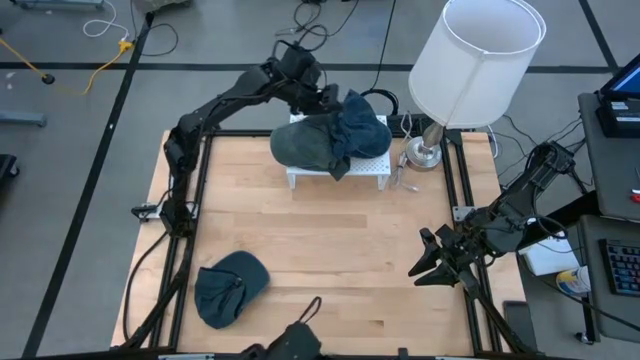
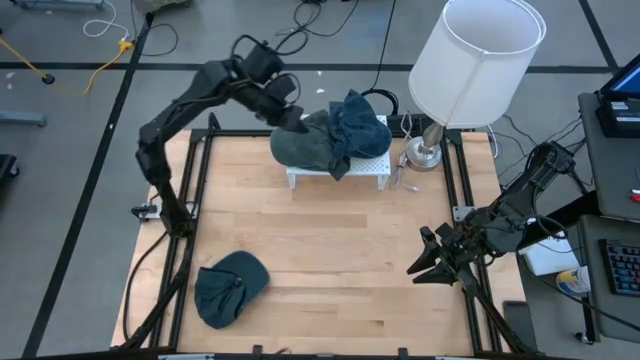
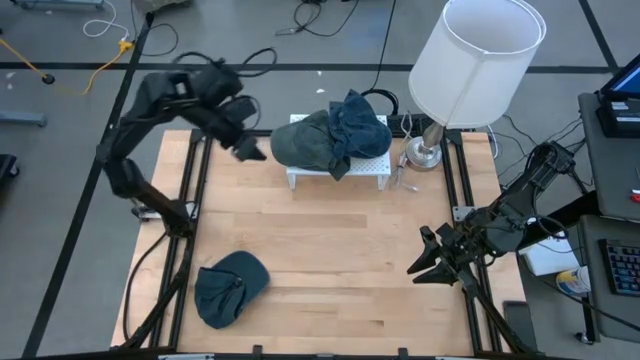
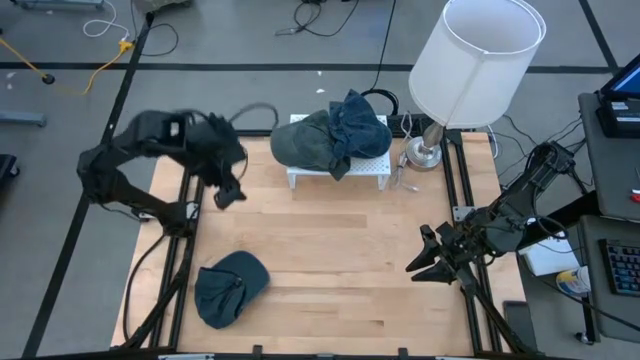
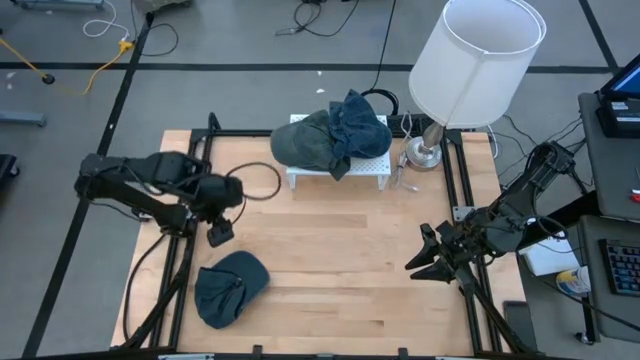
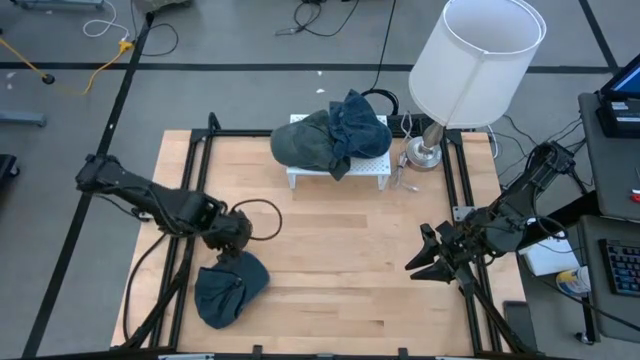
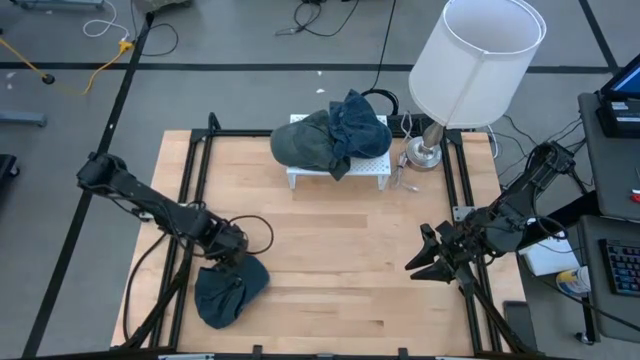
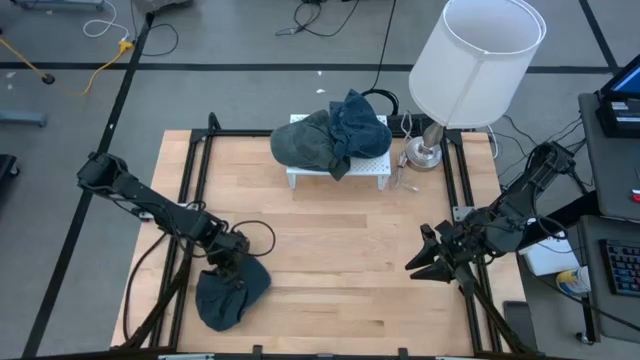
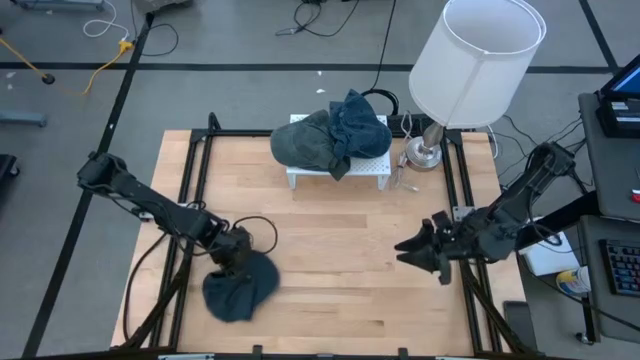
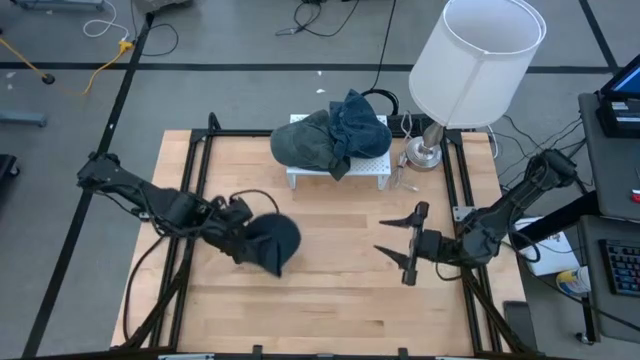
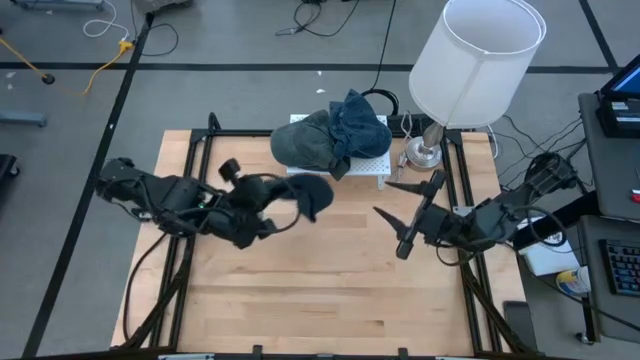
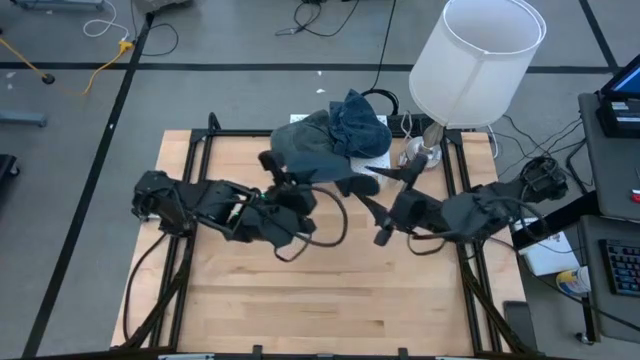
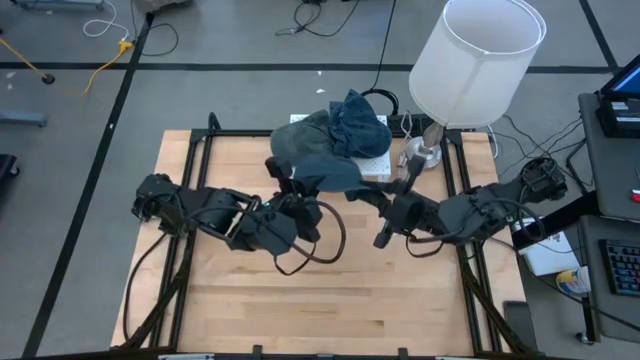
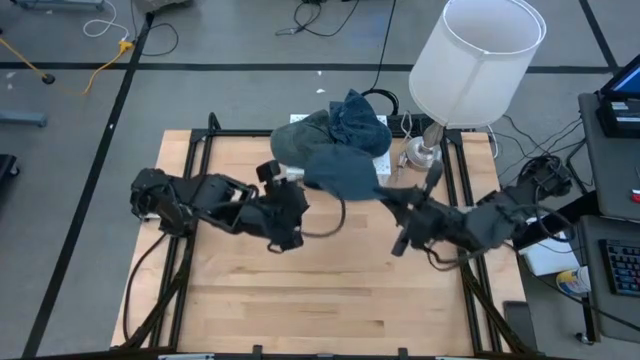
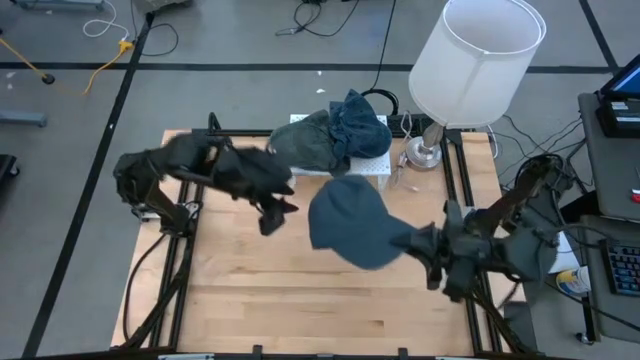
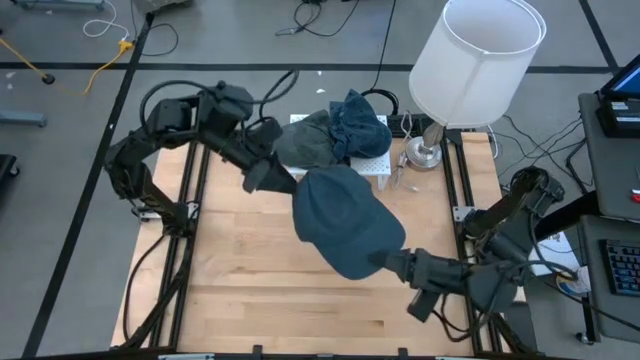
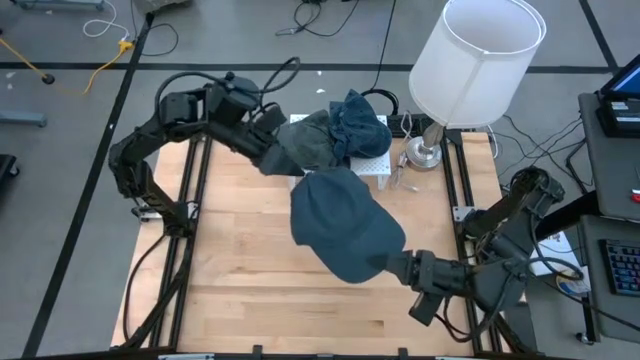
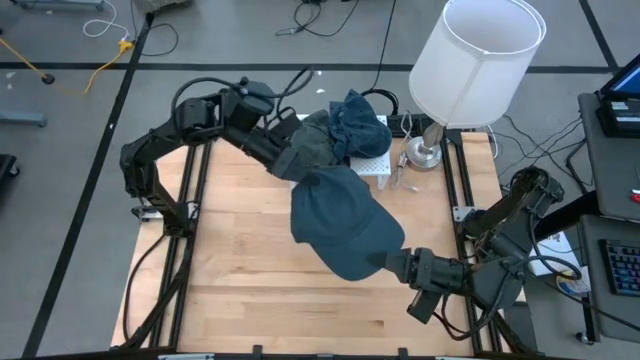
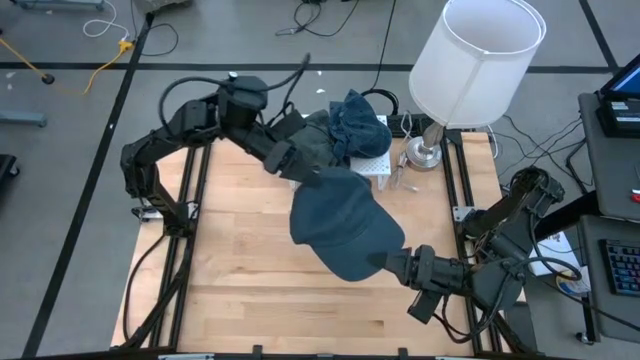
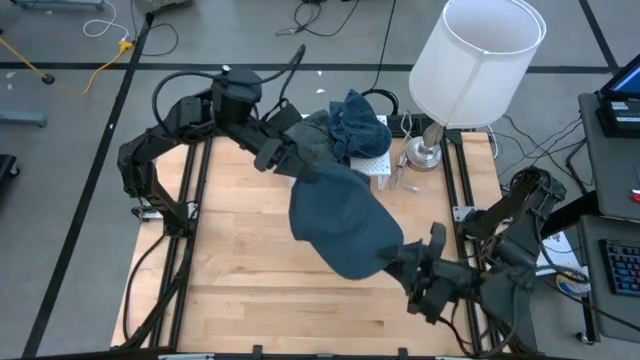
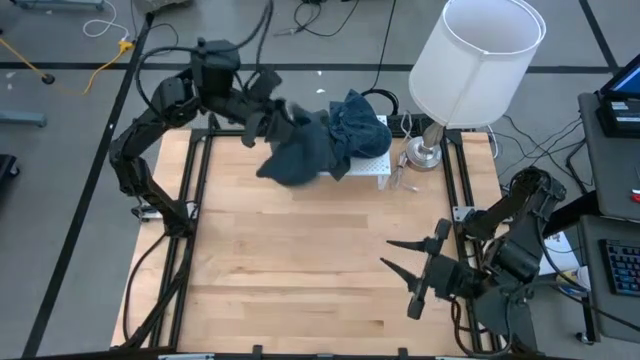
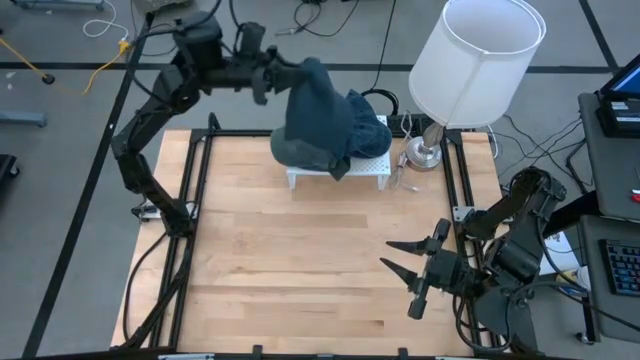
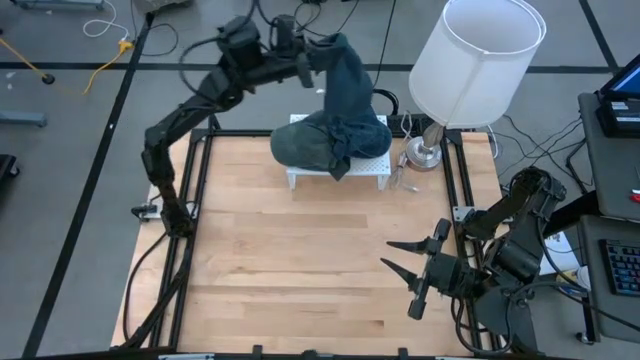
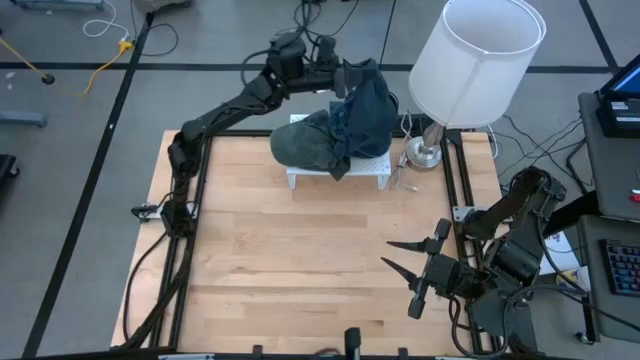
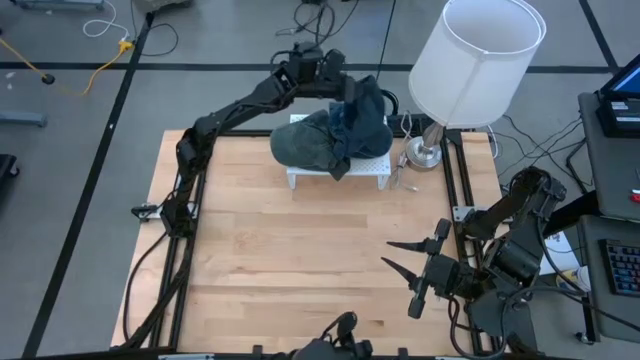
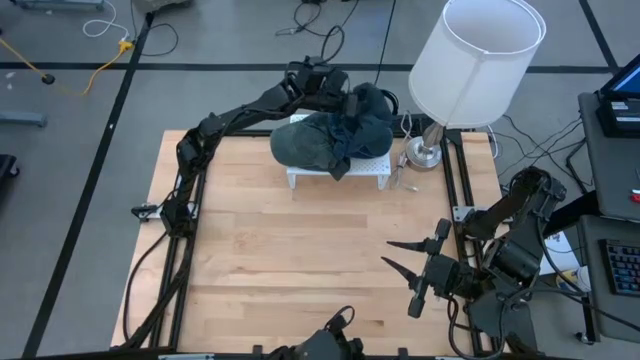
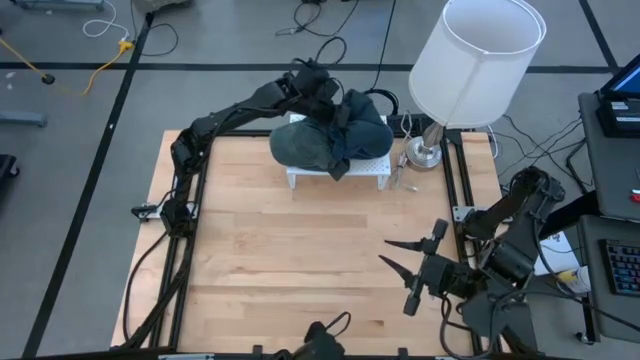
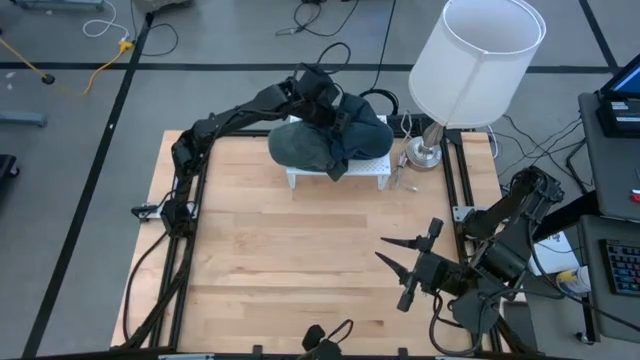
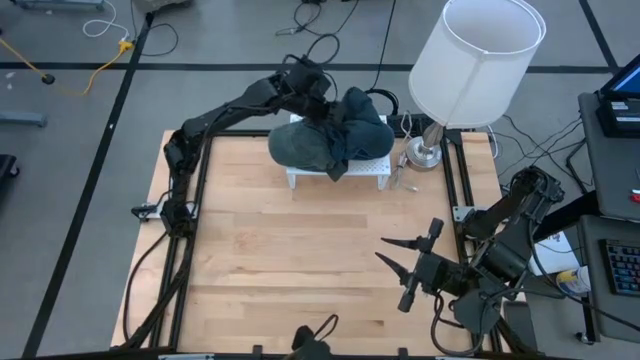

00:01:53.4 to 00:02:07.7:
Task: Pick & Place hat
Stack the blue cap on top of the gray blue on the shelf

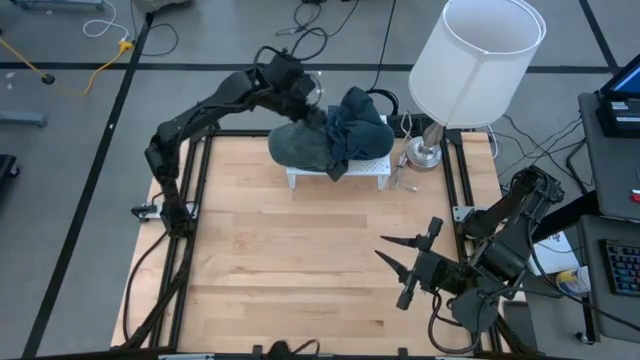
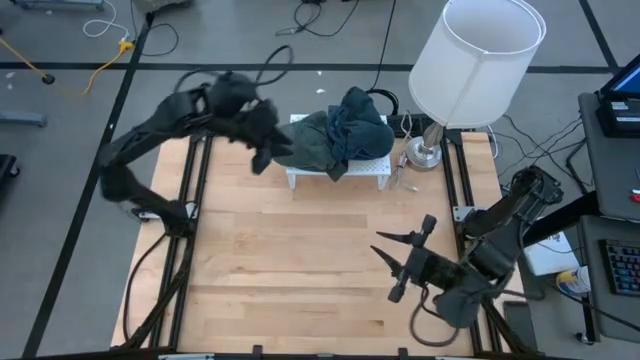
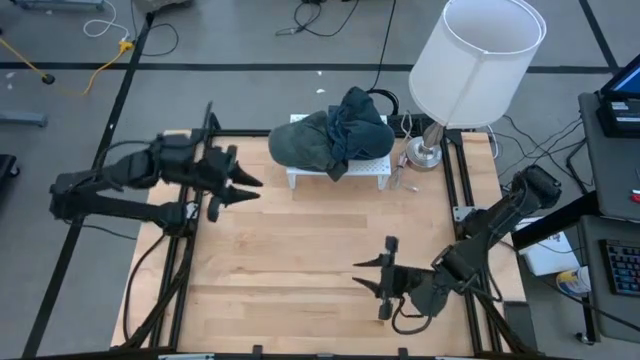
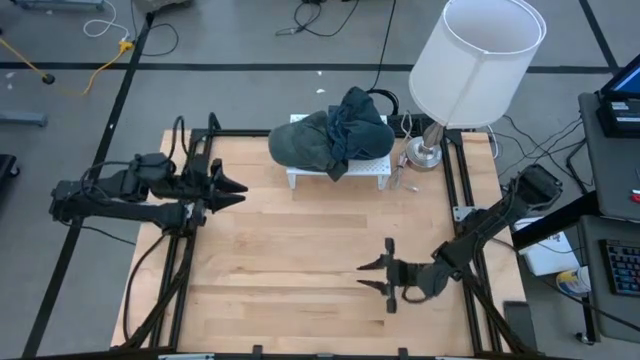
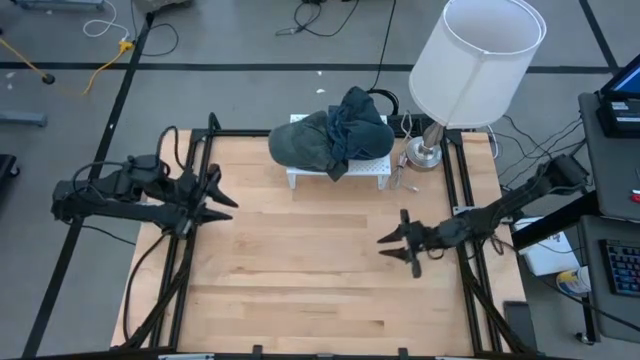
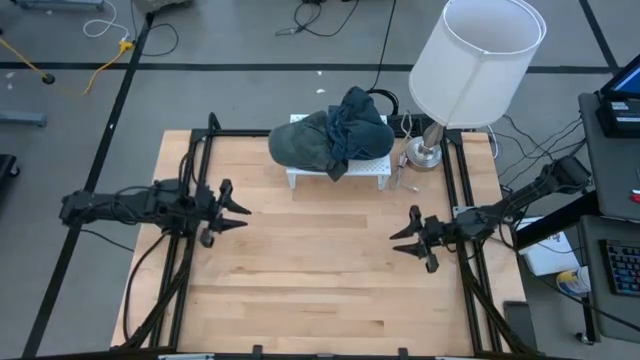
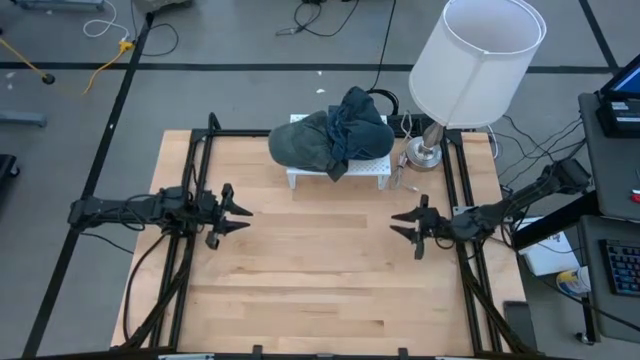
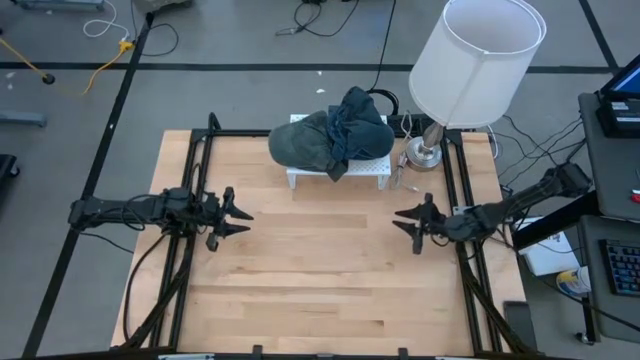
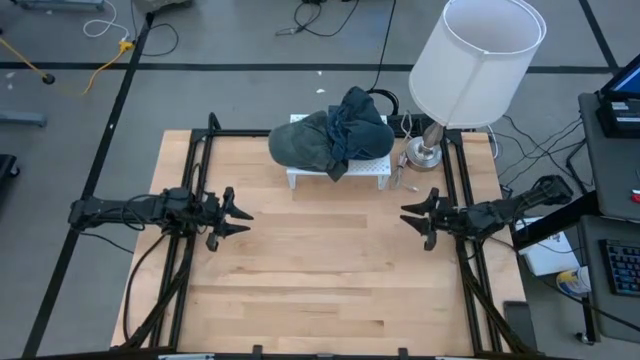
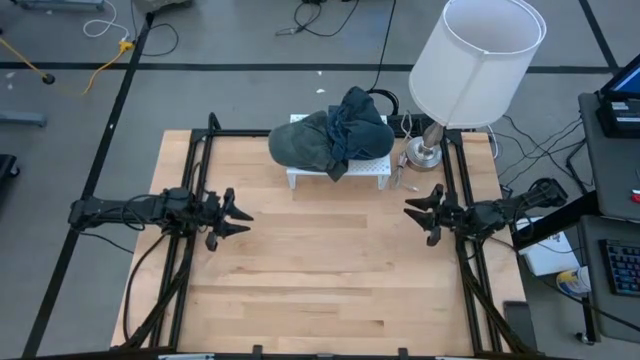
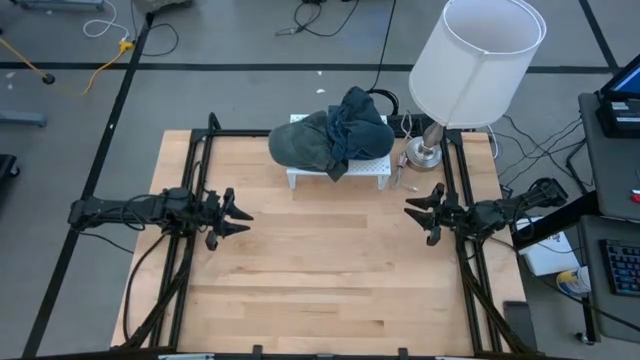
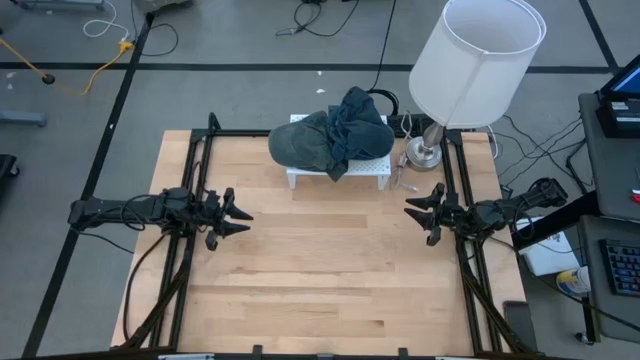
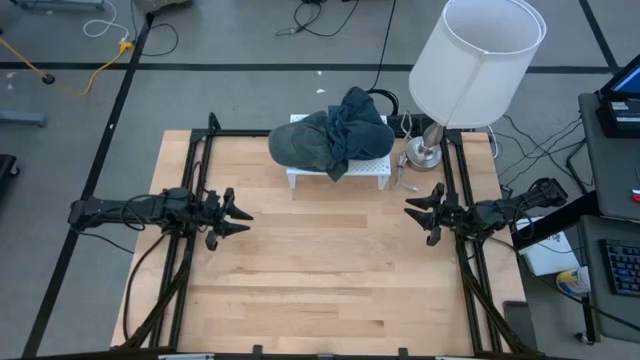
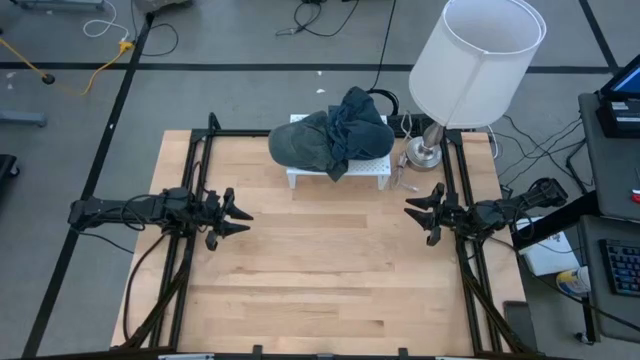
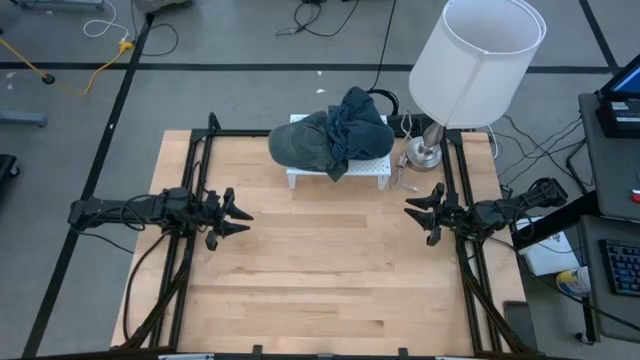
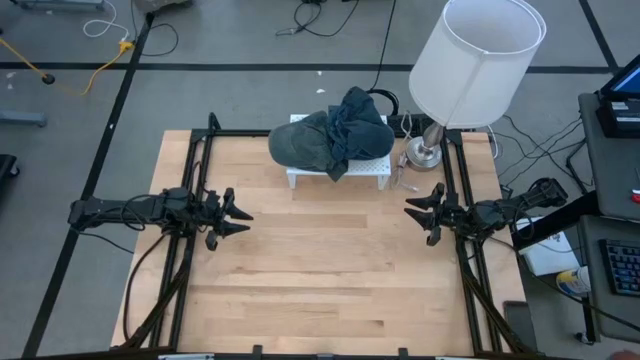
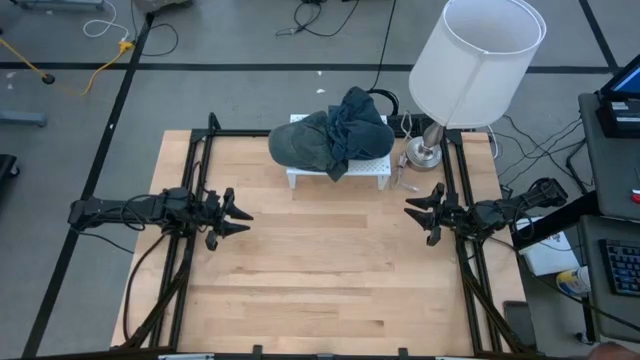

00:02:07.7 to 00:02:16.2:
Return to Home Position
